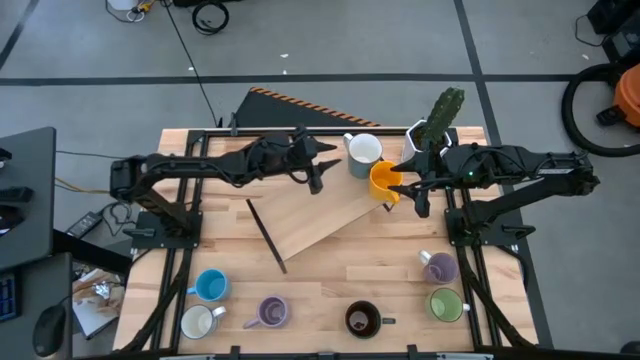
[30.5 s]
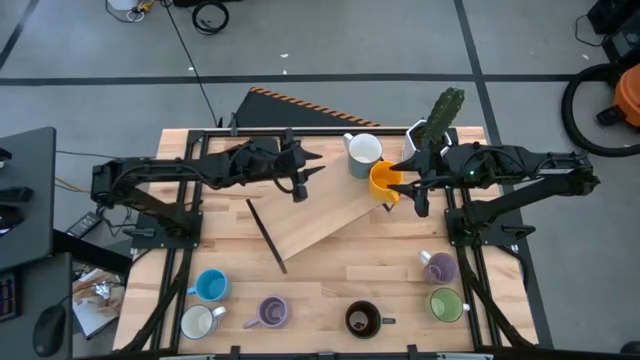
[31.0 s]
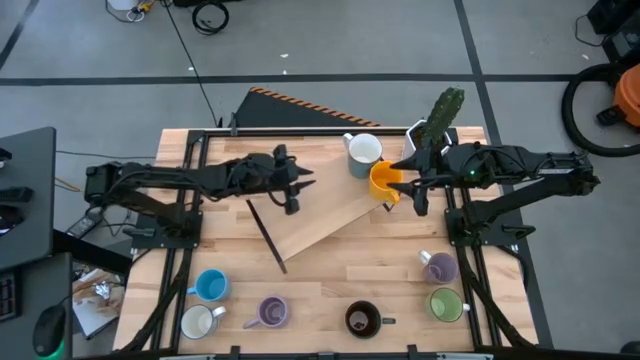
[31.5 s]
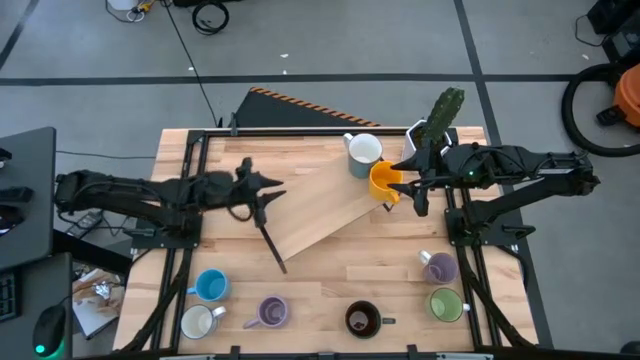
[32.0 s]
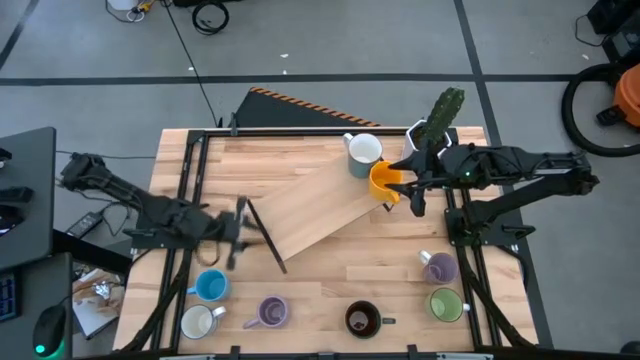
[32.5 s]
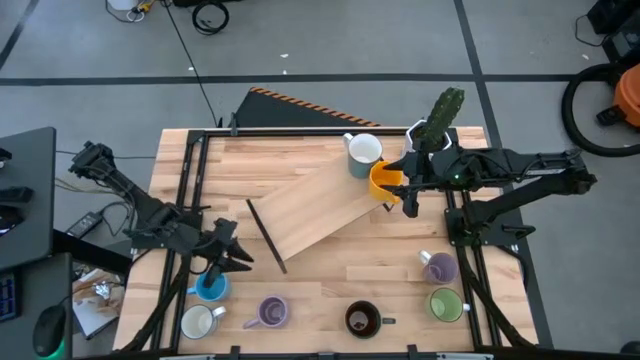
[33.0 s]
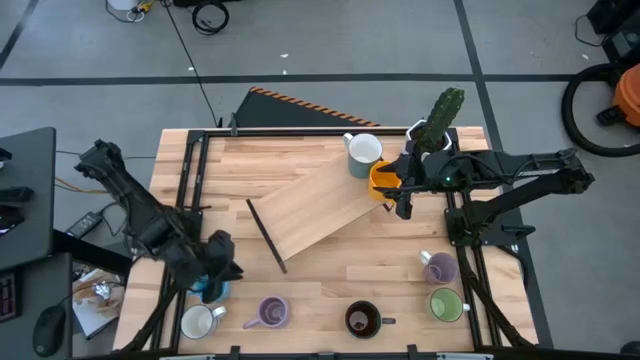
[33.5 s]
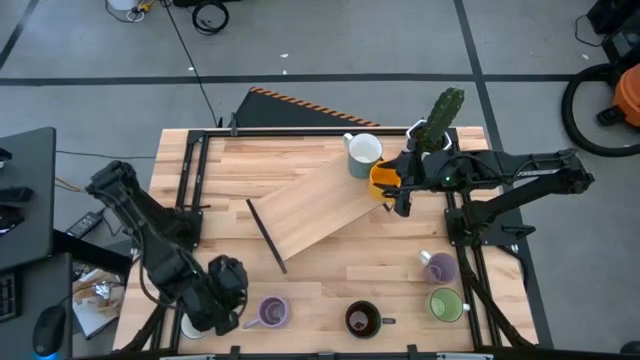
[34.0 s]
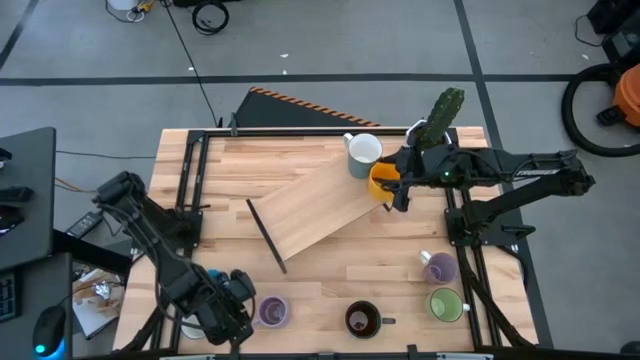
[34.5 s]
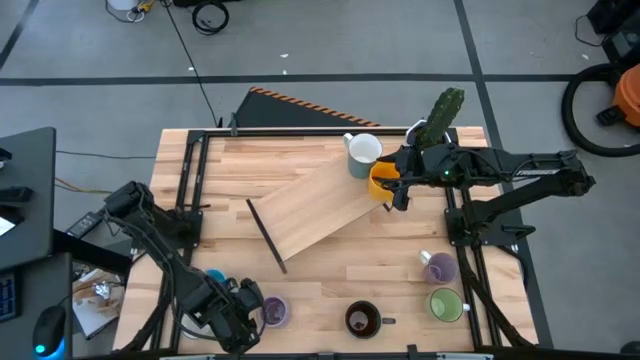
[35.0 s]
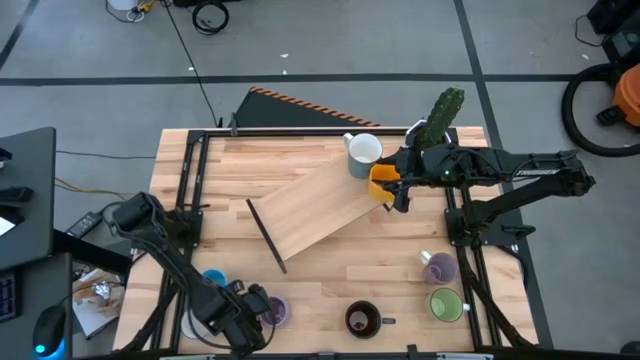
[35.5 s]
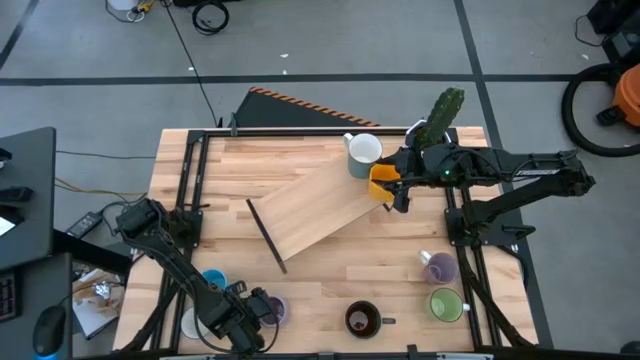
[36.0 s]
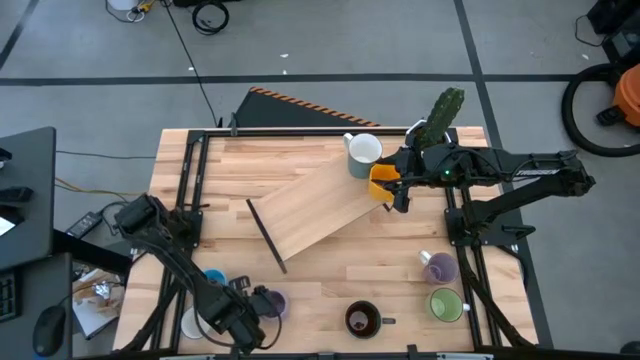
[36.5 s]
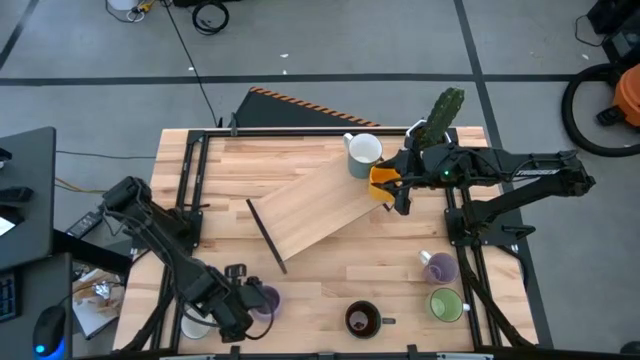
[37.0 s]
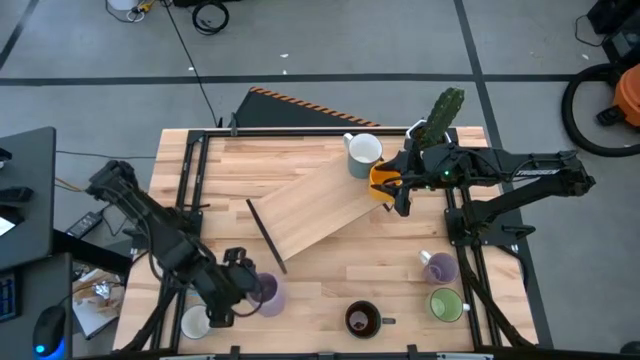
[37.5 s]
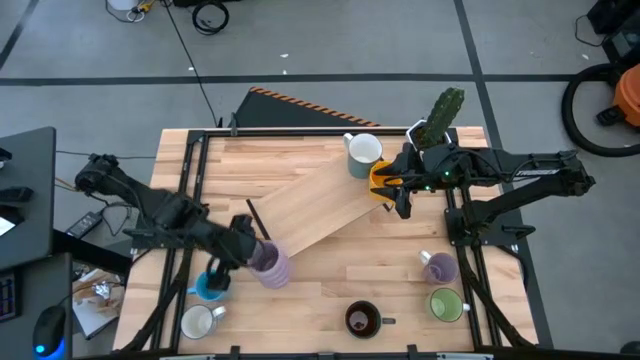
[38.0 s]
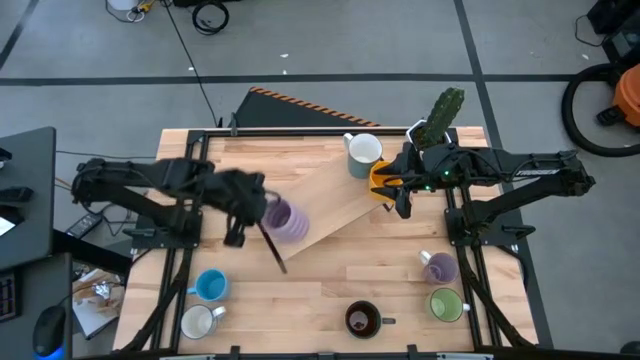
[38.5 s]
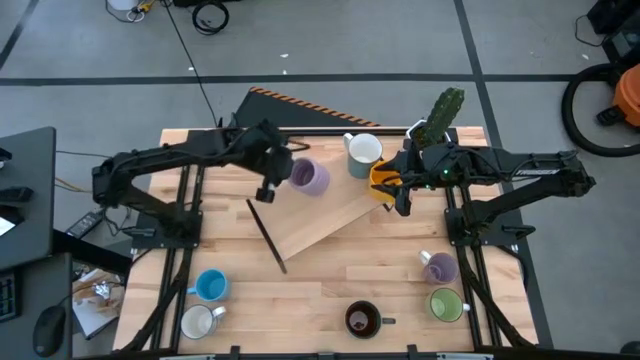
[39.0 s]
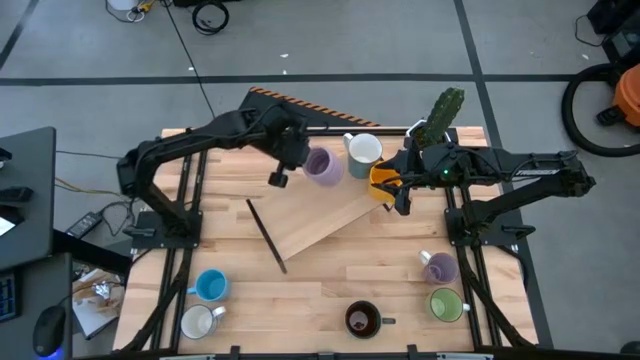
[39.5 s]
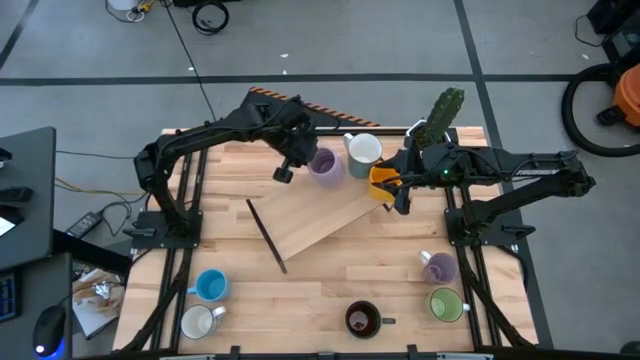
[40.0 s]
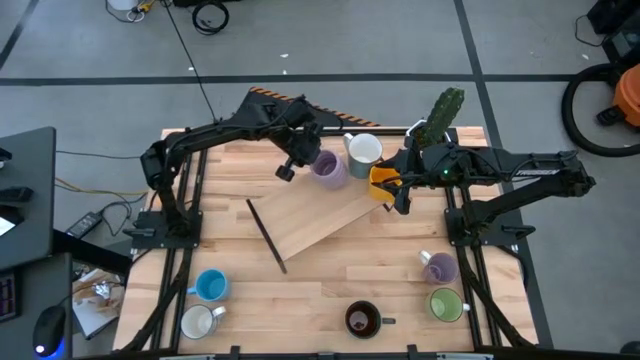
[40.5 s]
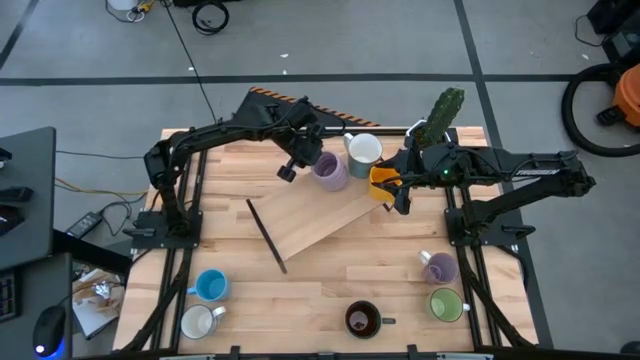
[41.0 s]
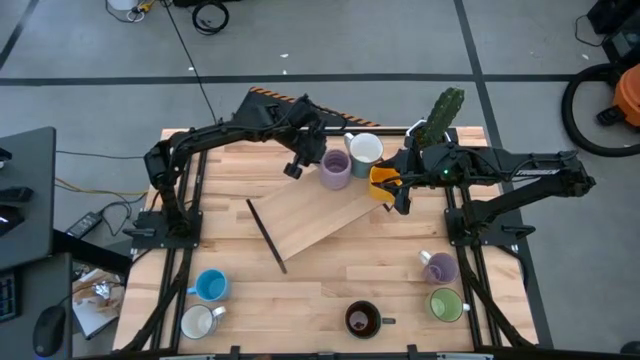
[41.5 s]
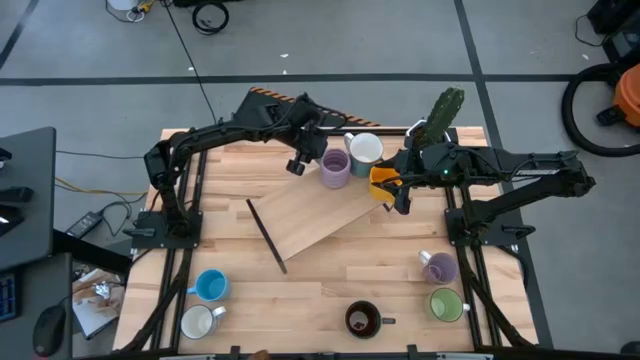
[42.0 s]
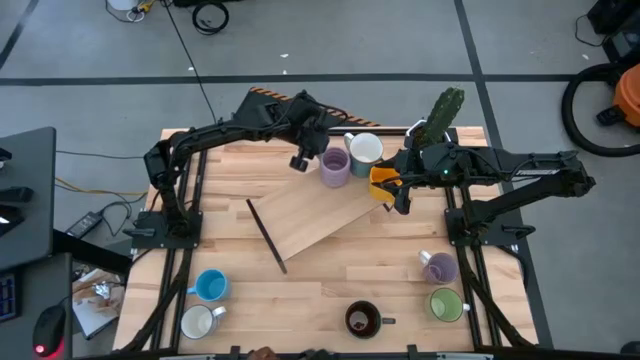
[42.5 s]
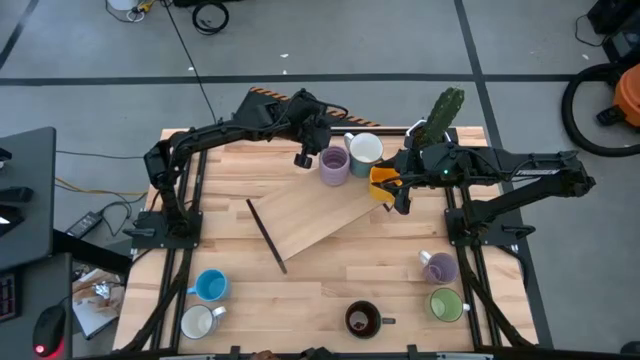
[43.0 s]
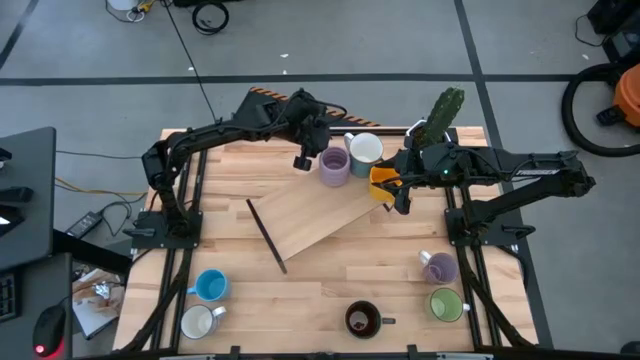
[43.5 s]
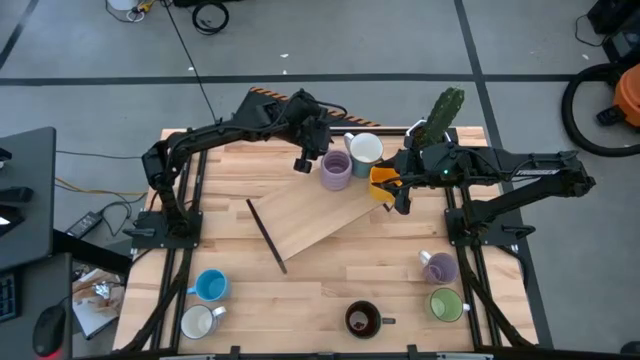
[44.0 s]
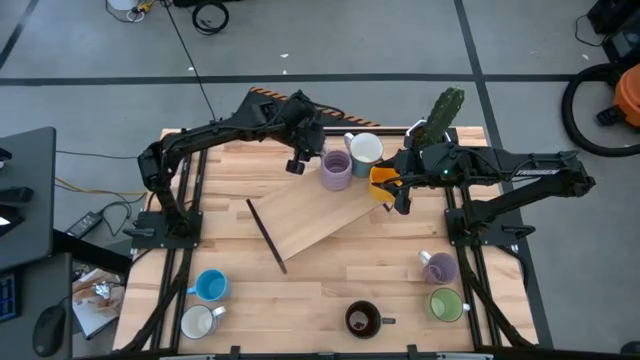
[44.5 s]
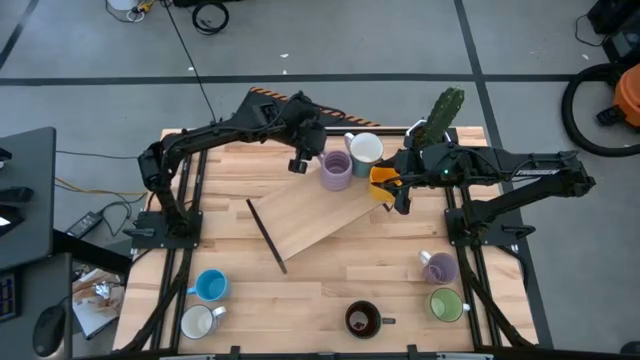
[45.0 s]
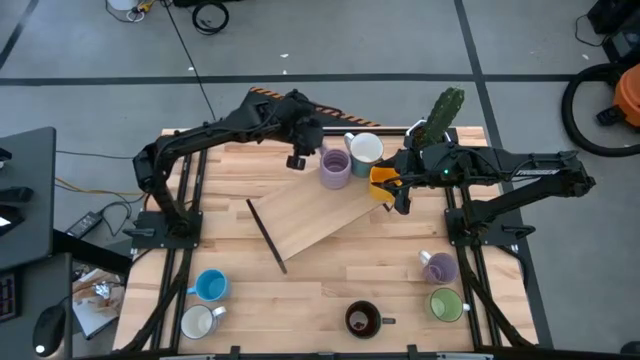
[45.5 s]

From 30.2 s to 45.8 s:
Task: Place coffee mugs
Put the purple mug on the shelf

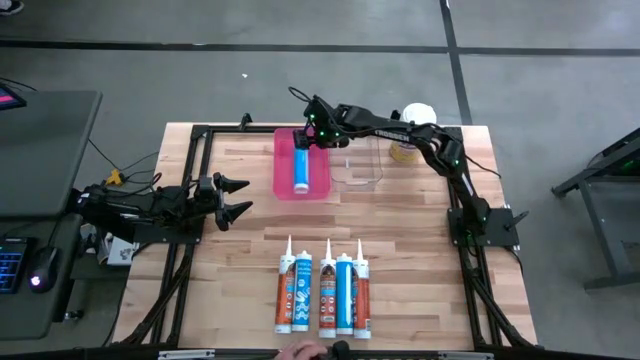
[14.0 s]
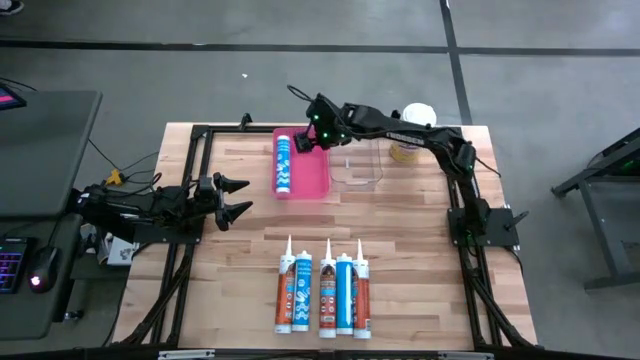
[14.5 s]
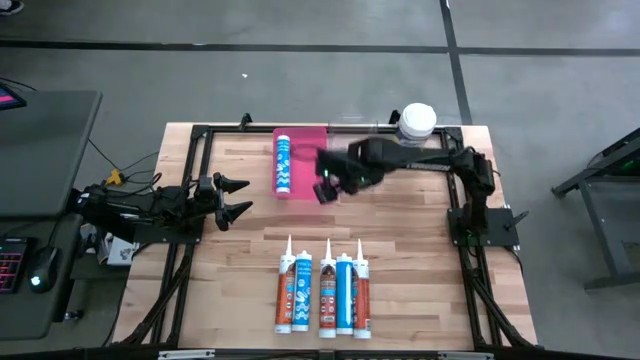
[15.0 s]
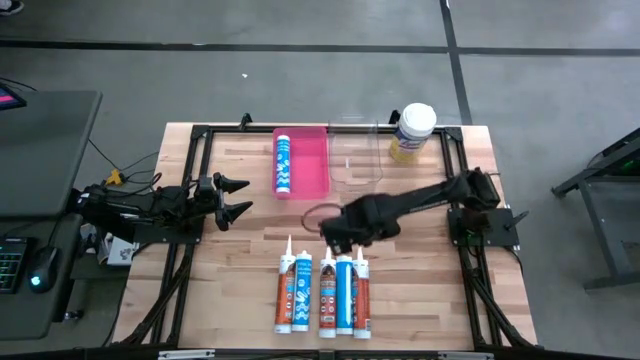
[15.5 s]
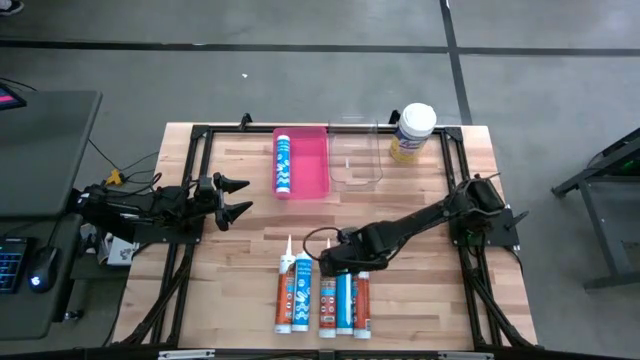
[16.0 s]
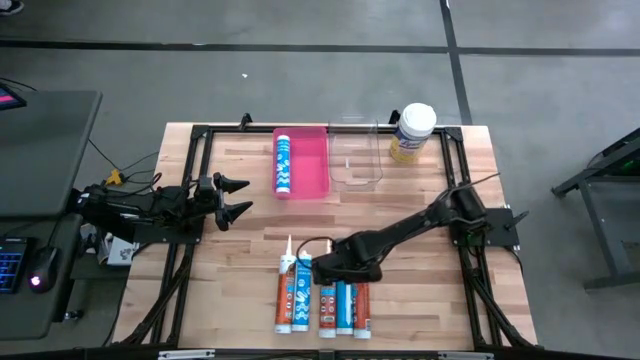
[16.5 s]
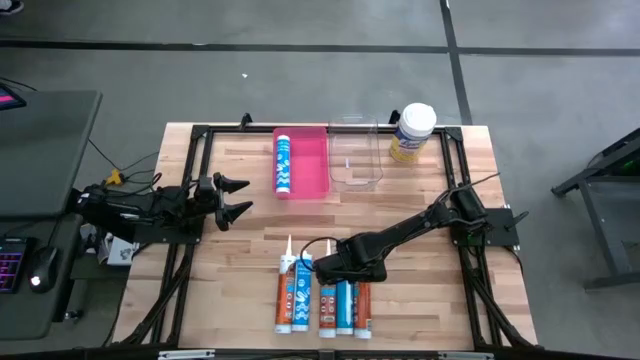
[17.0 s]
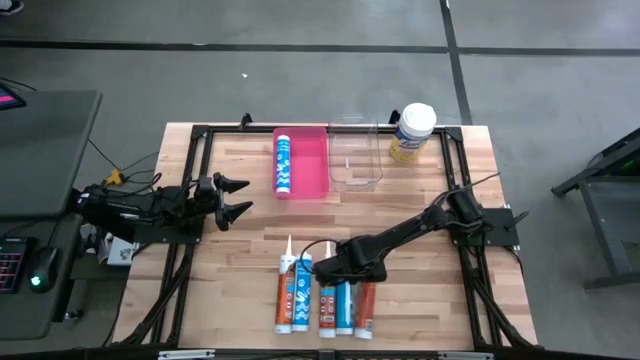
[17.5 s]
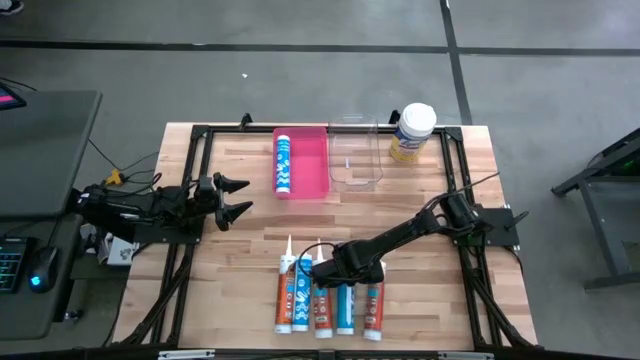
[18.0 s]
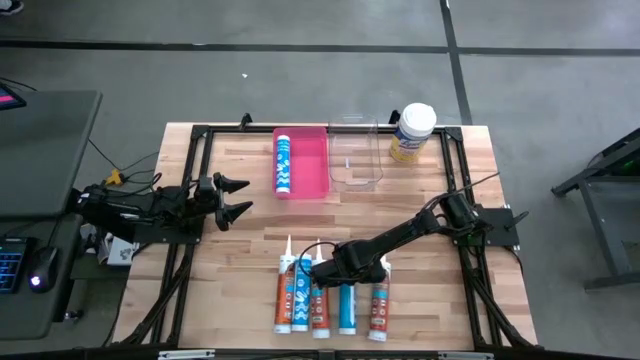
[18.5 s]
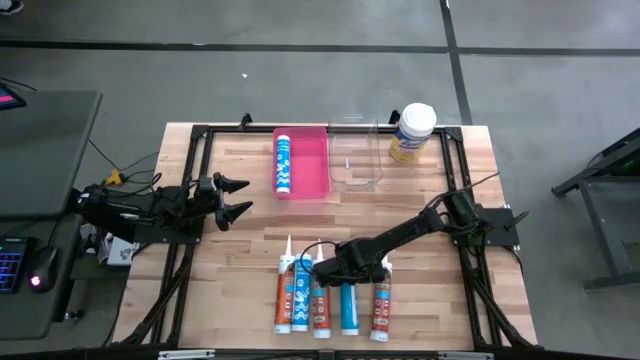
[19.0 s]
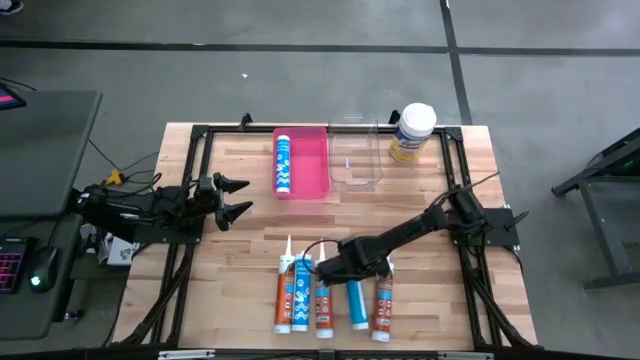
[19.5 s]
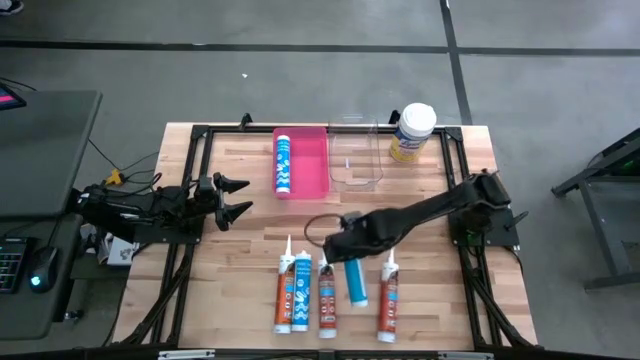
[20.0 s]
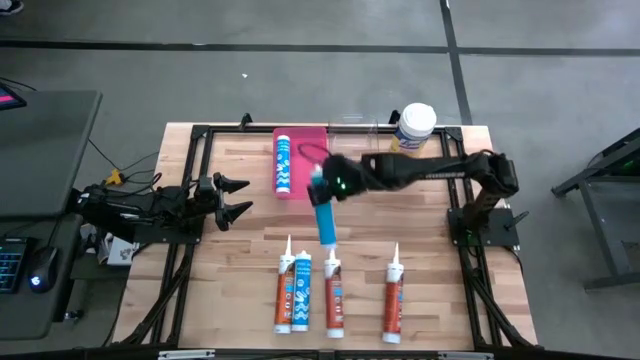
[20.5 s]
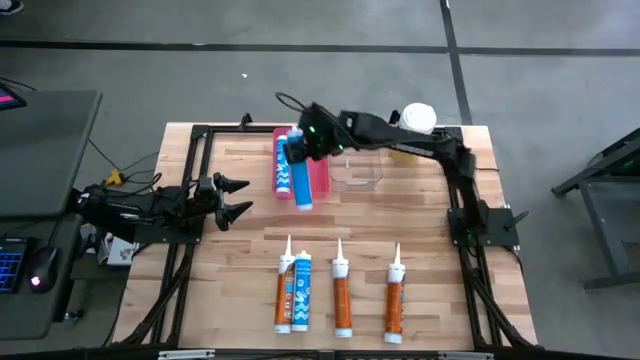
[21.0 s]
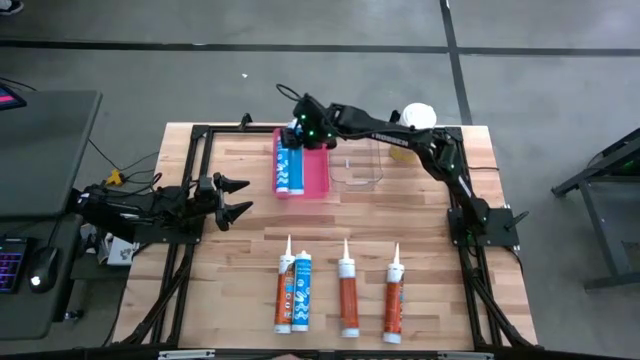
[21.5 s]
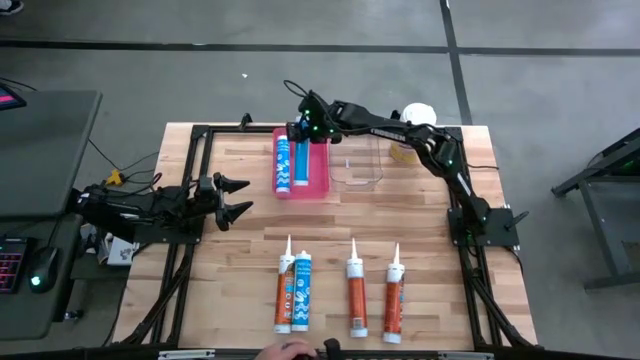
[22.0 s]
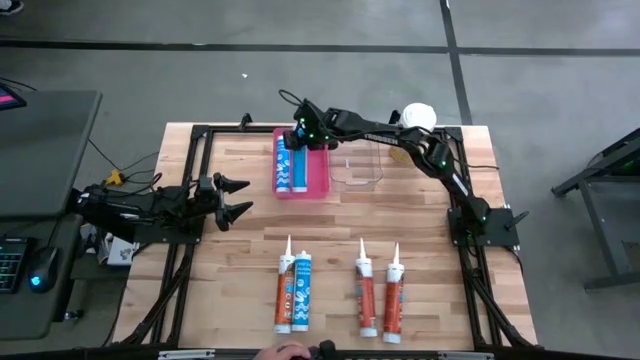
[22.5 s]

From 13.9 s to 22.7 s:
Task: Pick & place silicon tubes, Sealant and Lysol wipes
Put the right blue sealant into the red bin
